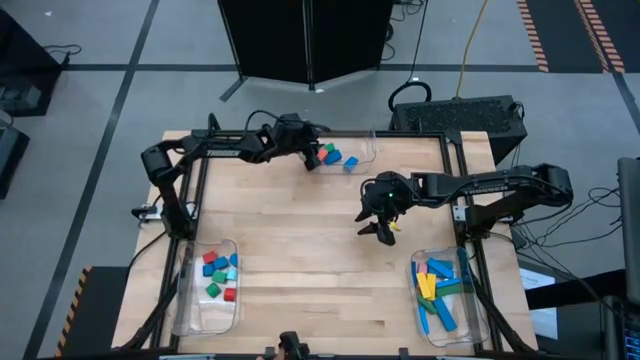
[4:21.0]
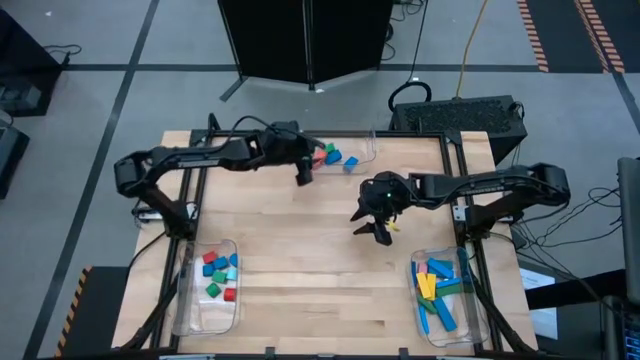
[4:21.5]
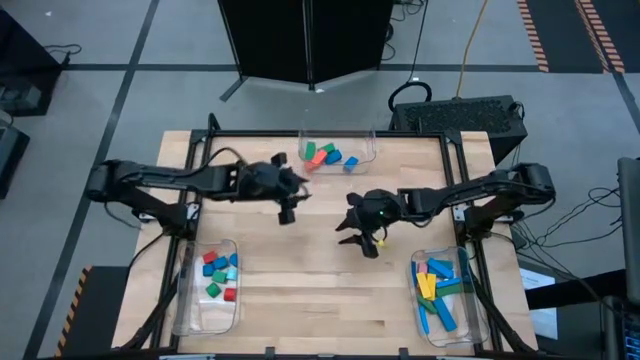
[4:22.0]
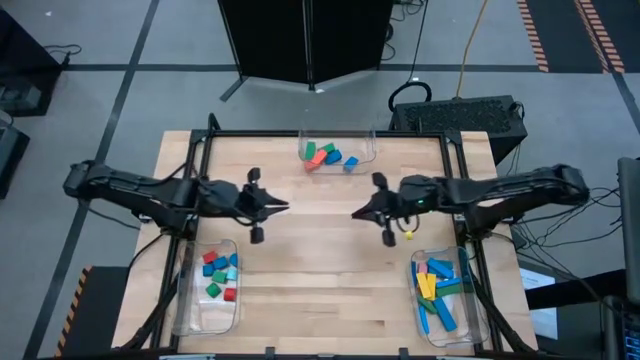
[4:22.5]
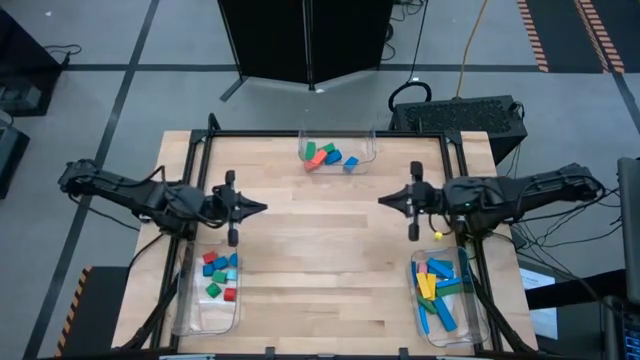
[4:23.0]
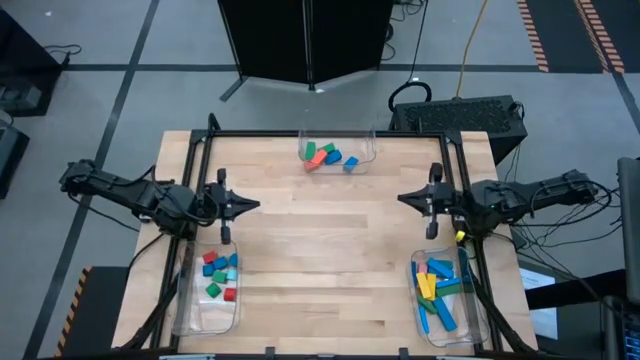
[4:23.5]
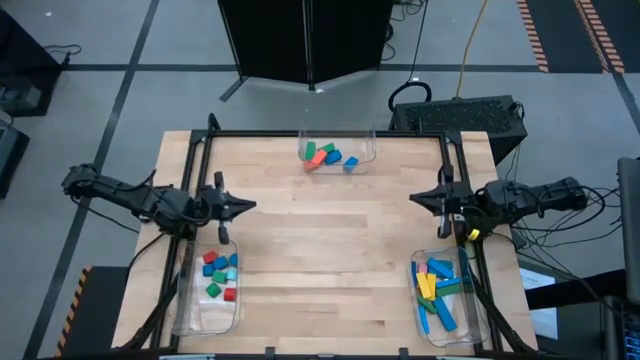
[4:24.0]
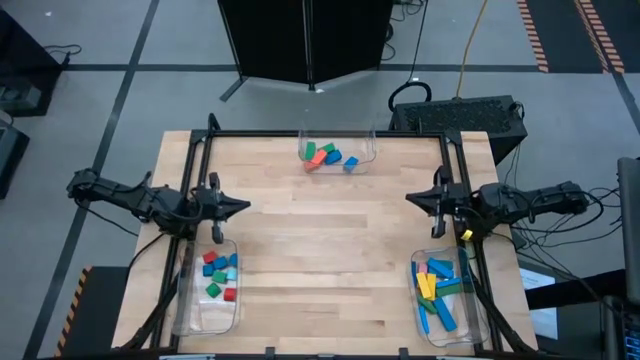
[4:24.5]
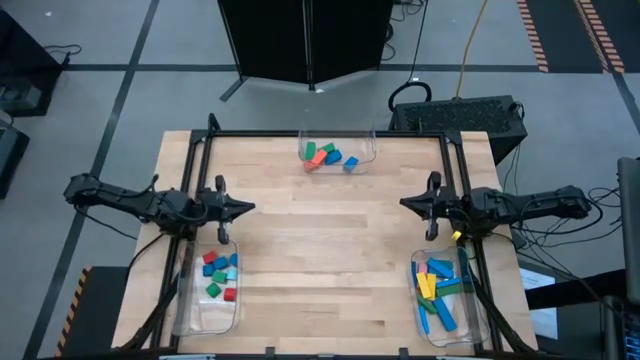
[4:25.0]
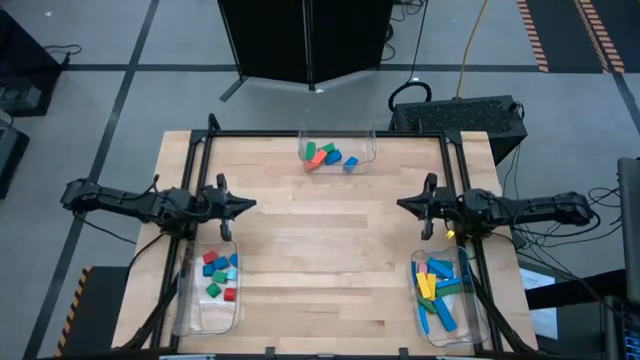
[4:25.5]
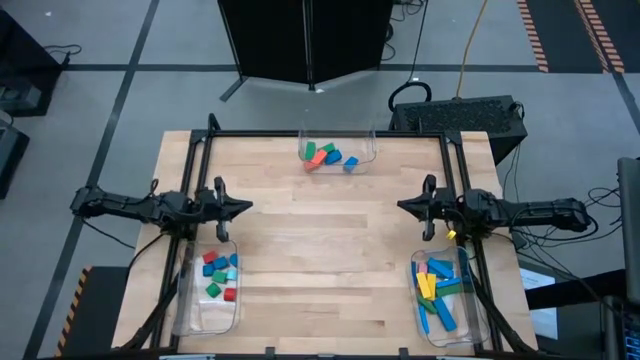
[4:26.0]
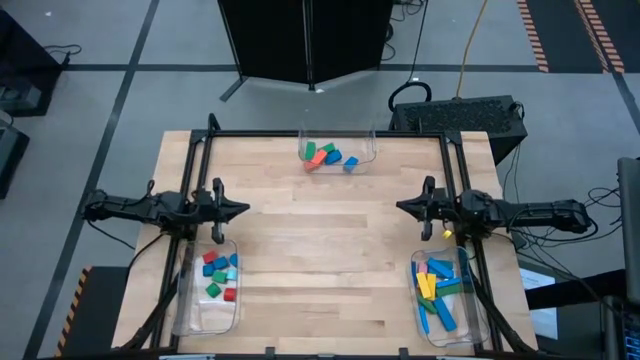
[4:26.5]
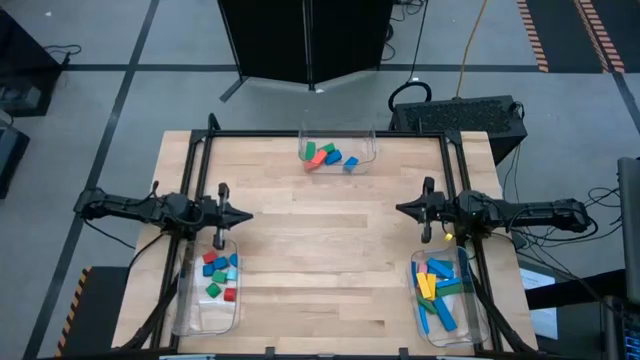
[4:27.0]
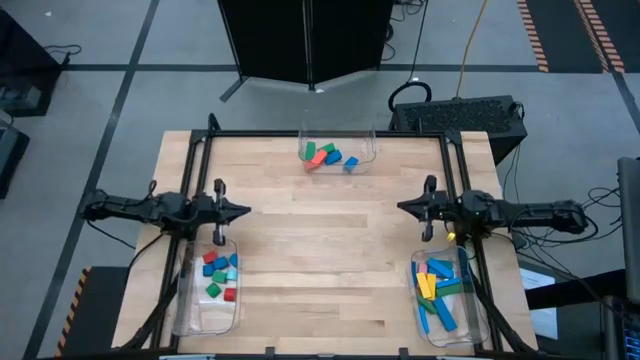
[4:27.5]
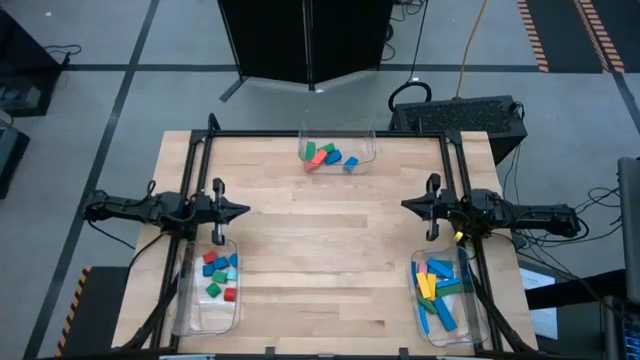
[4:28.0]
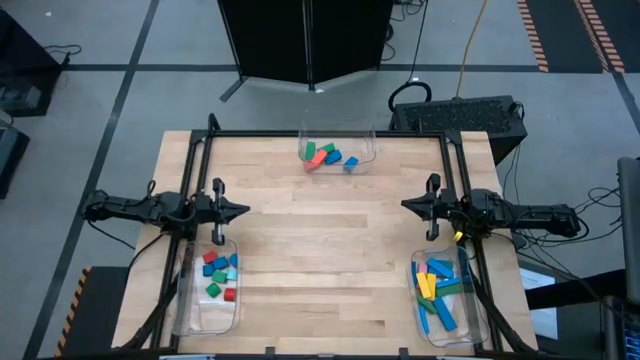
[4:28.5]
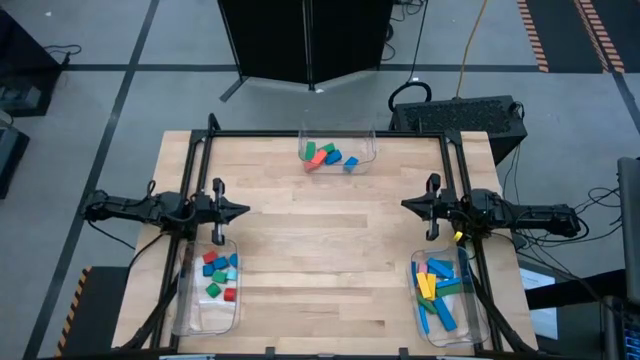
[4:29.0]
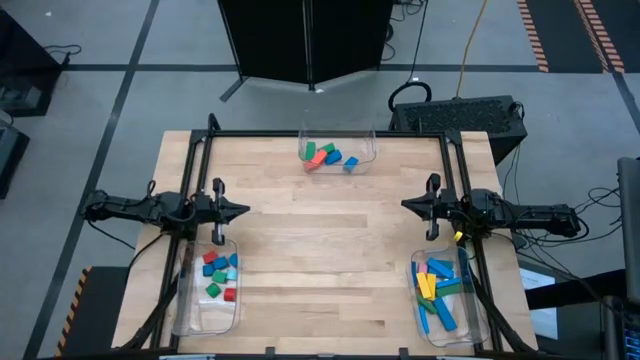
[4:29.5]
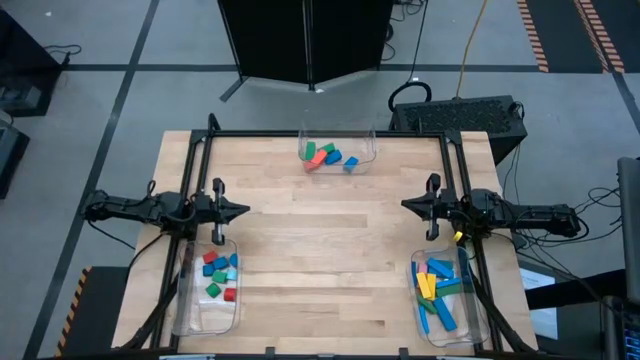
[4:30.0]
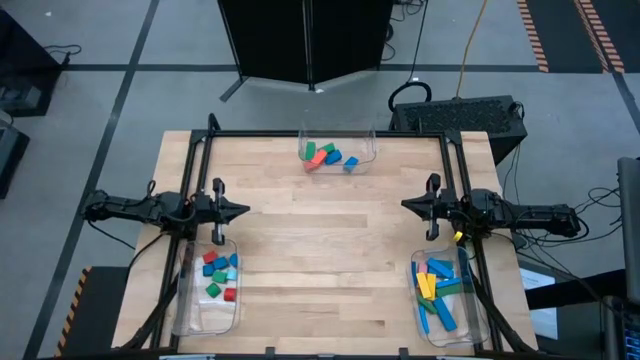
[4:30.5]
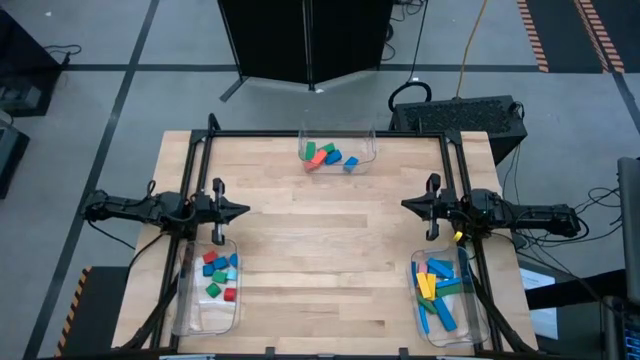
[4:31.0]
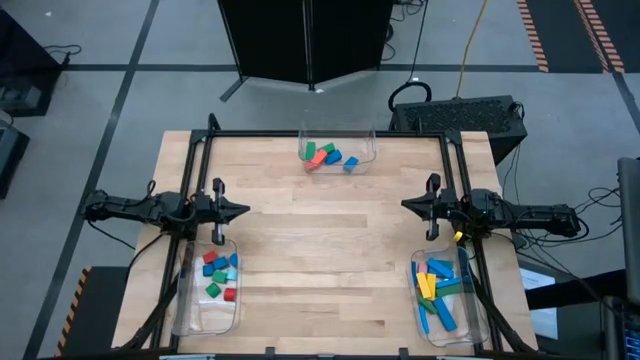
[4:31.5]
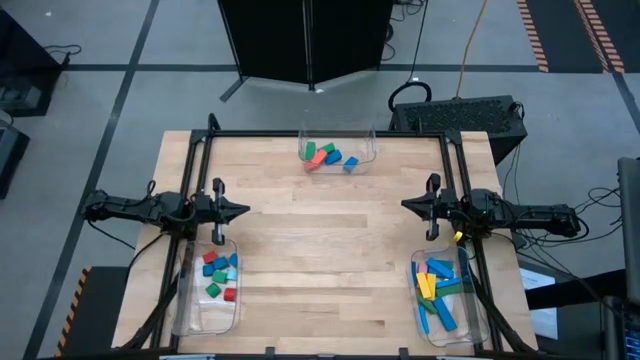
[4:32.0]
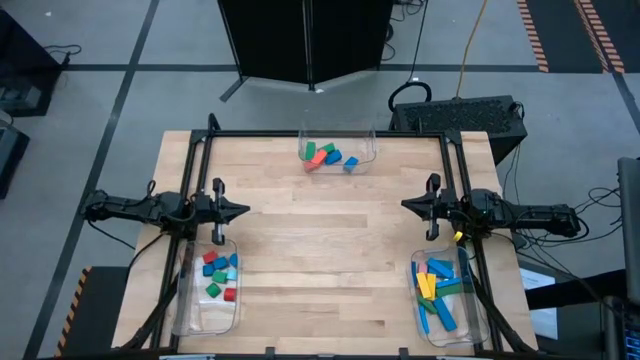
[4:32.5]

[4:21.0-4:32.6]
Task: Sort blocks by size
Return to Home Position

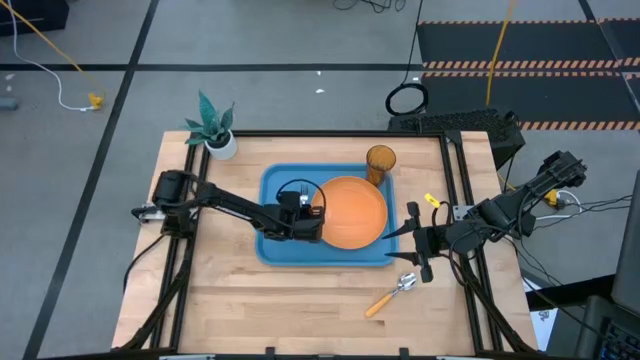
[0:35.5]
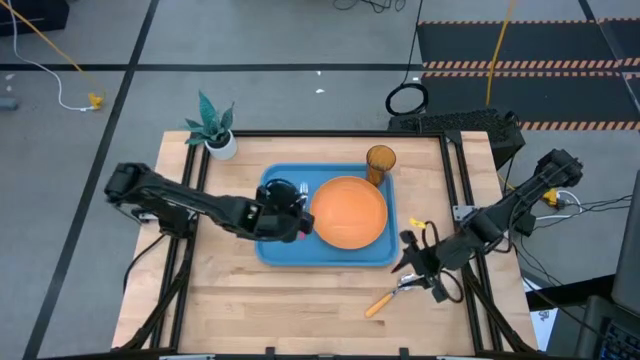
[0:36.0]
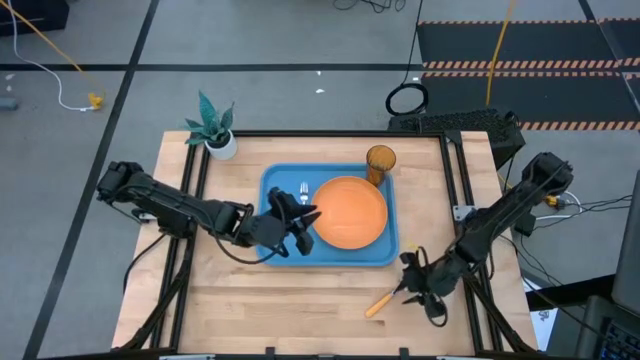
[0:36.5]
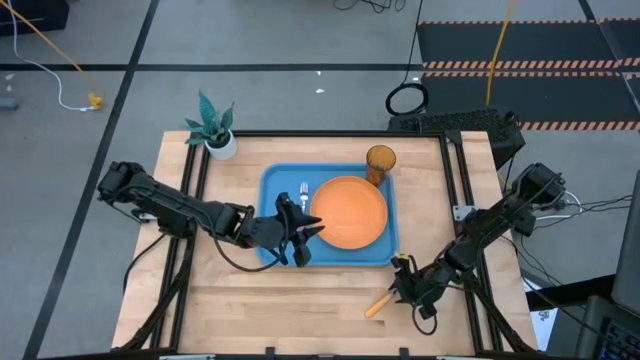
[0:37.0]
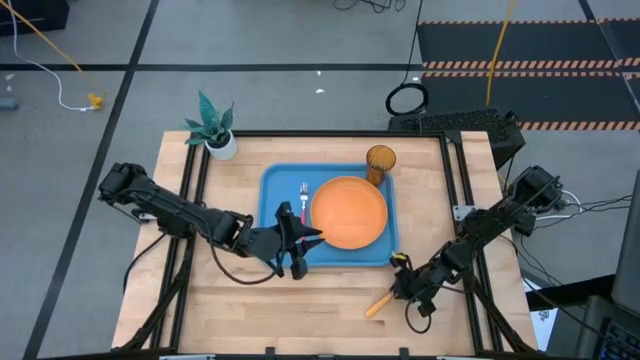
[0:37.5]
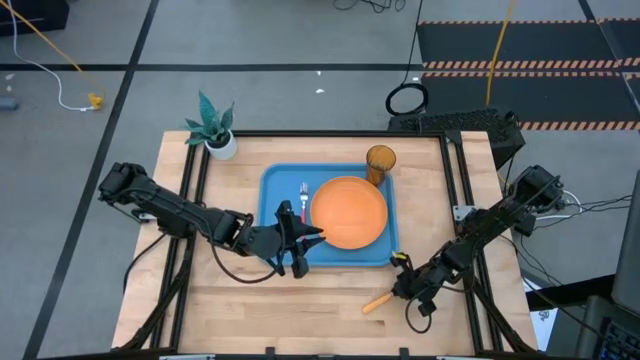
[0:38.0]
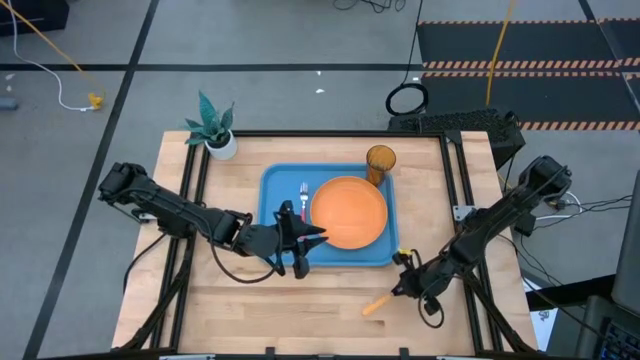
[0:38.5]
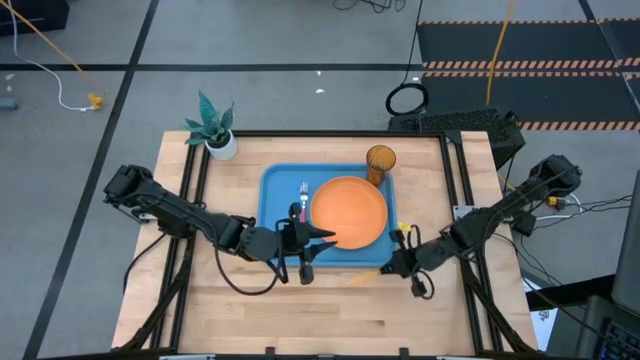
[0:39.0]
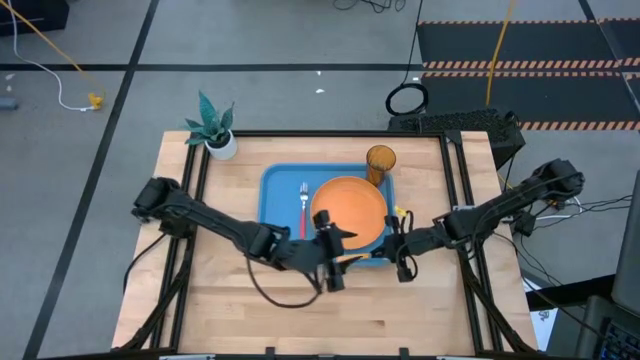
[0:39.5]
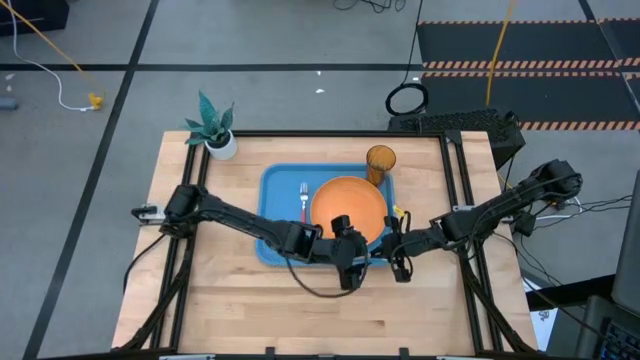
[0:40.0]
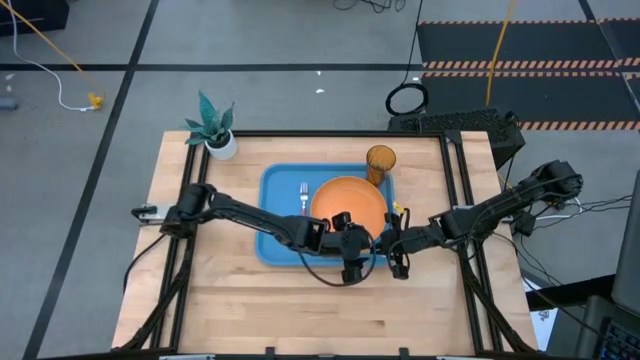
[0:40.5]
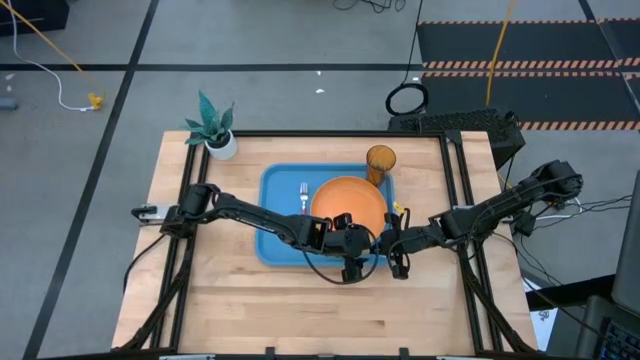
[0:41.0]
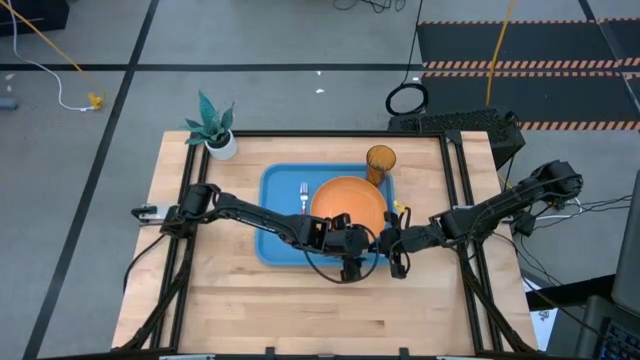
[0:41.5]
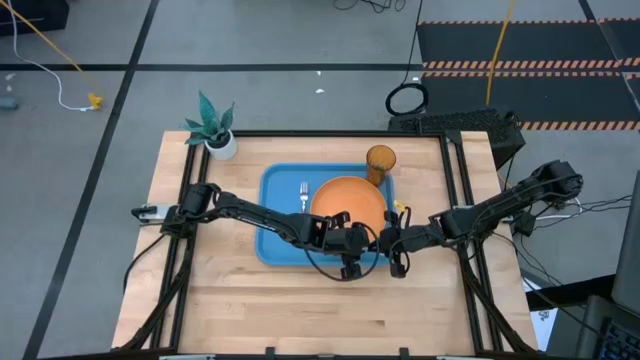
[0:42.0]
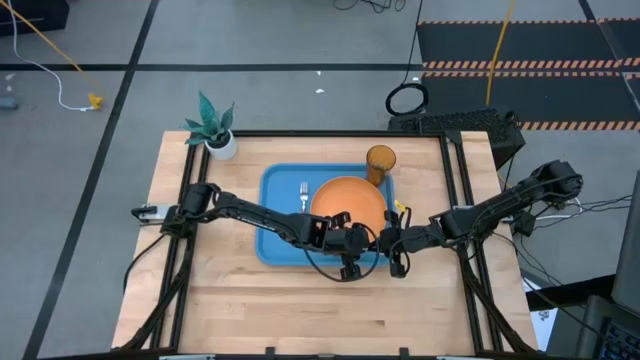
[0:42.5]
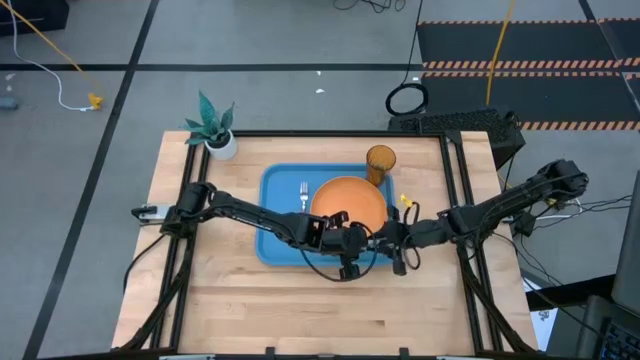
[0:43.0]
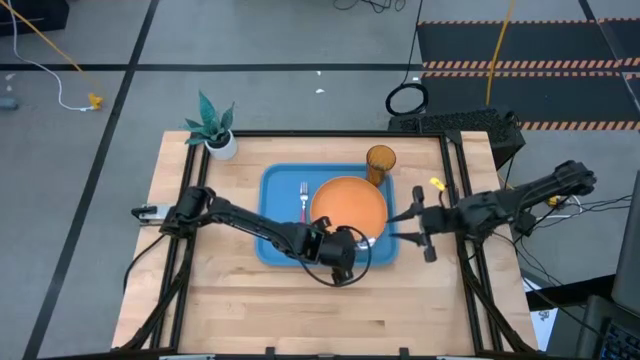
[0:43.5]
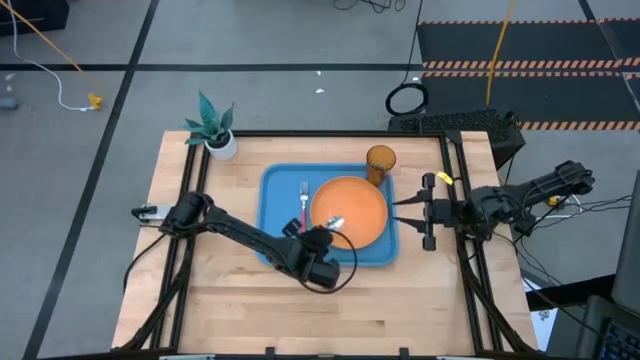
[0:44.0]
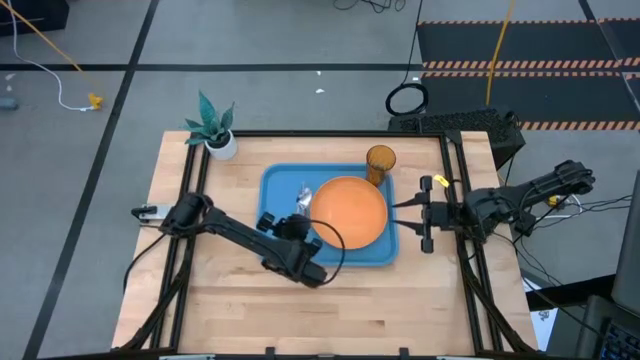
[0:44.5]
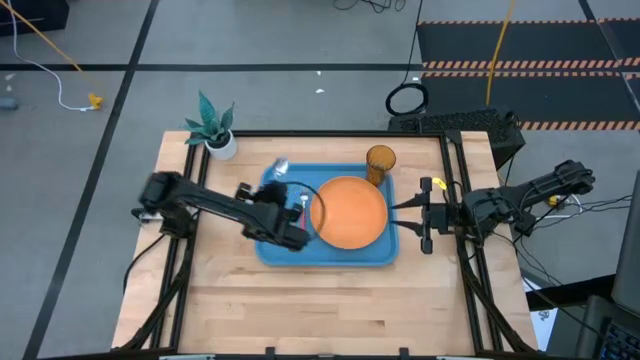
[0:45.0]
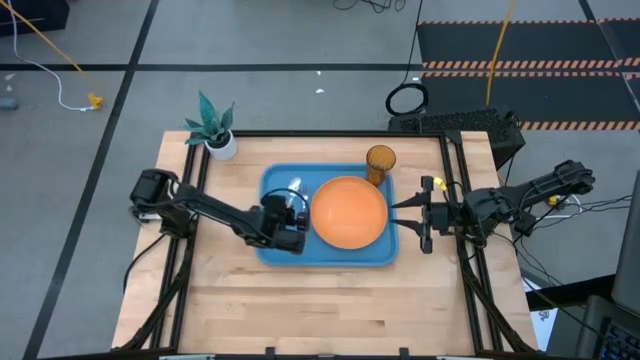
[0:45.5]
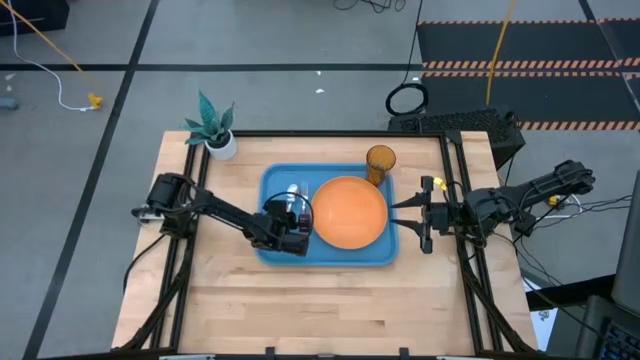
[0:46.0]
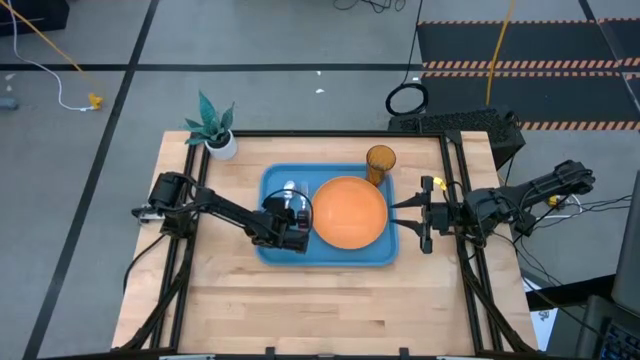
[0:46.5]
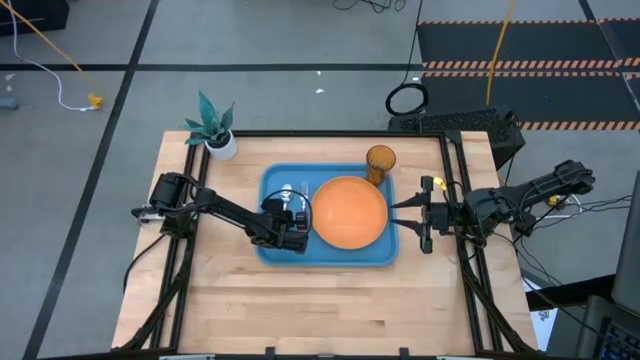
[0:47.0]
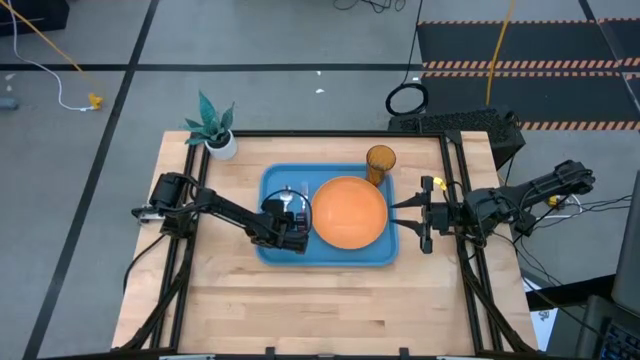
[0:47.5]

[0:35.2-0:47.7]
Task: Pick and place plate/cup/fork/spoon on tray
Put the yellow spoon on the blue tray to the left side of the red fork
